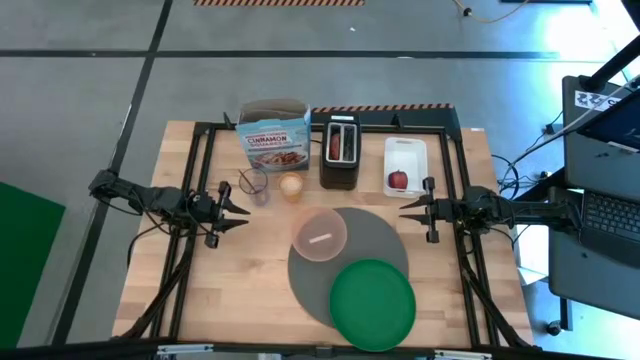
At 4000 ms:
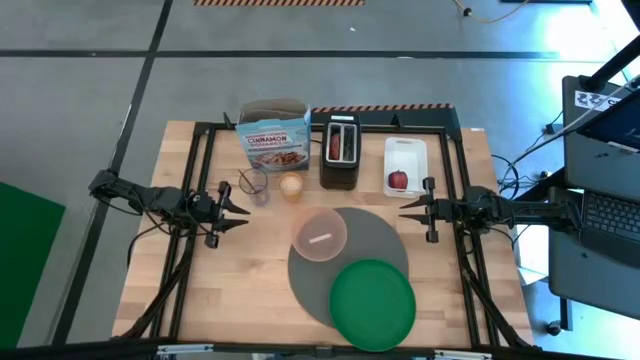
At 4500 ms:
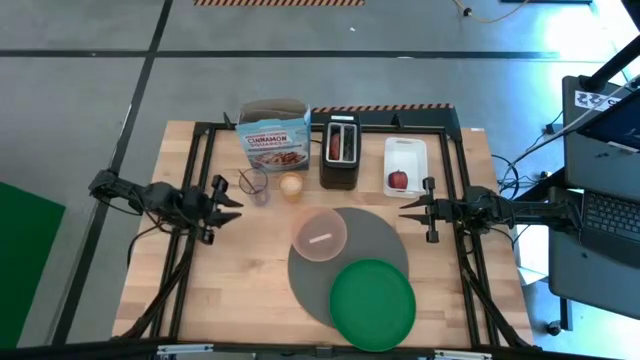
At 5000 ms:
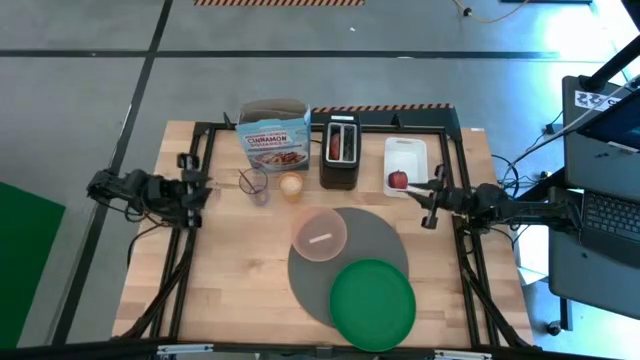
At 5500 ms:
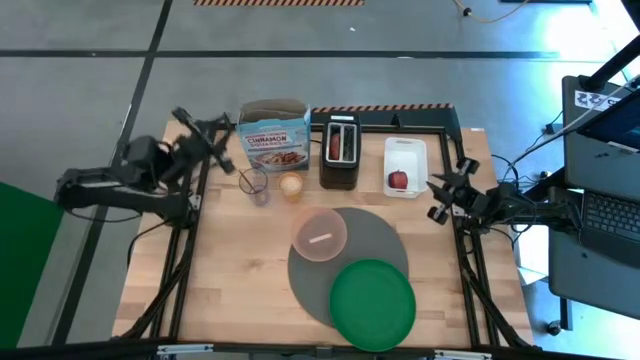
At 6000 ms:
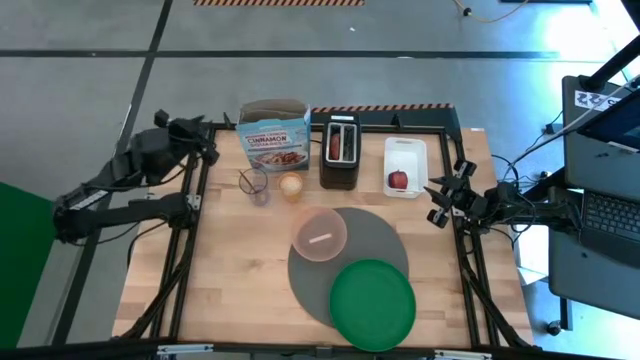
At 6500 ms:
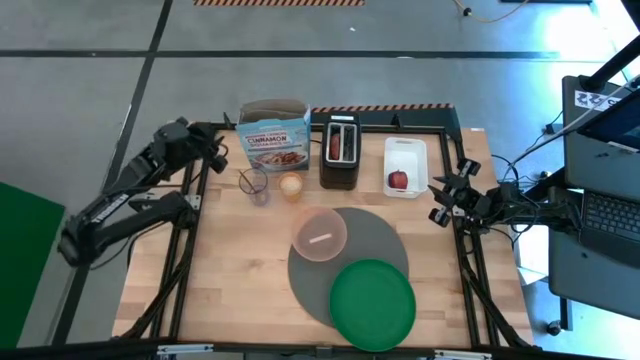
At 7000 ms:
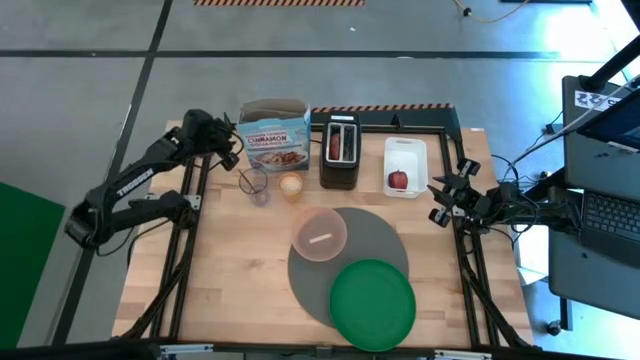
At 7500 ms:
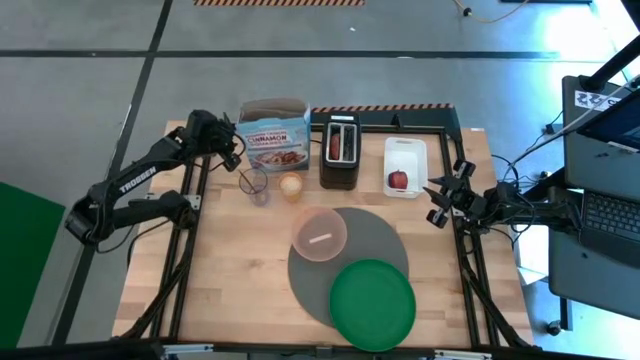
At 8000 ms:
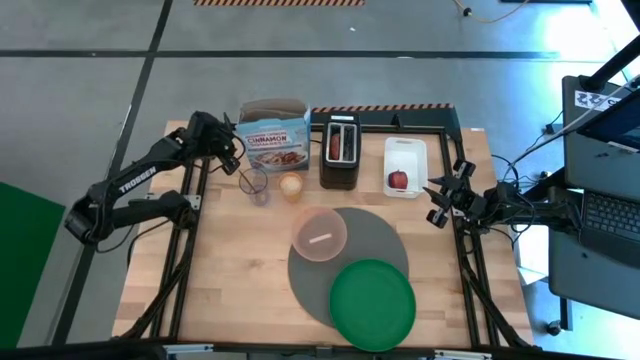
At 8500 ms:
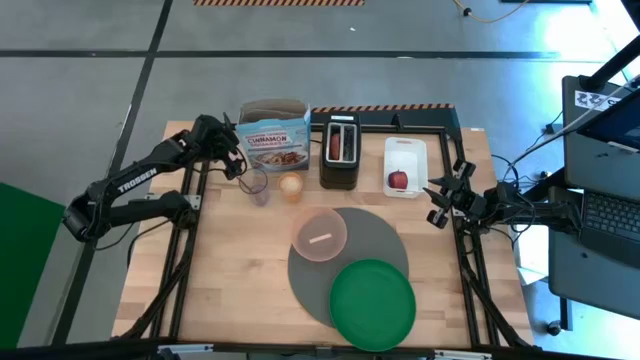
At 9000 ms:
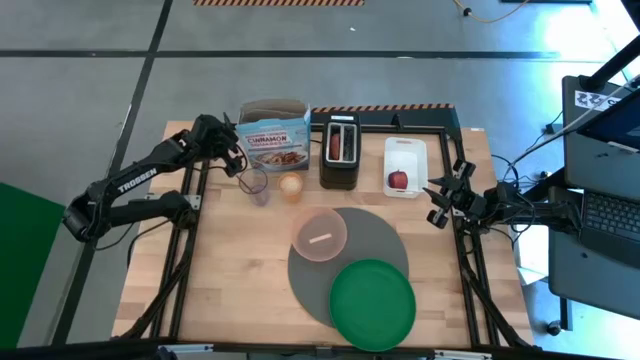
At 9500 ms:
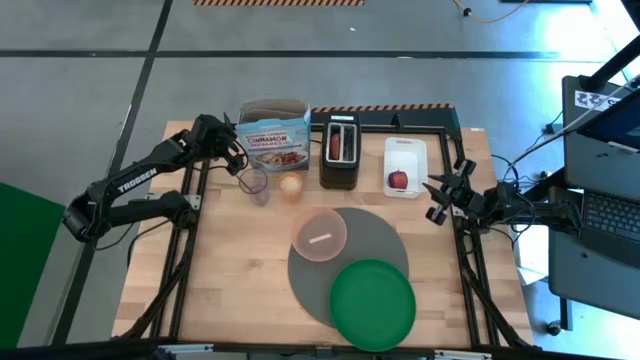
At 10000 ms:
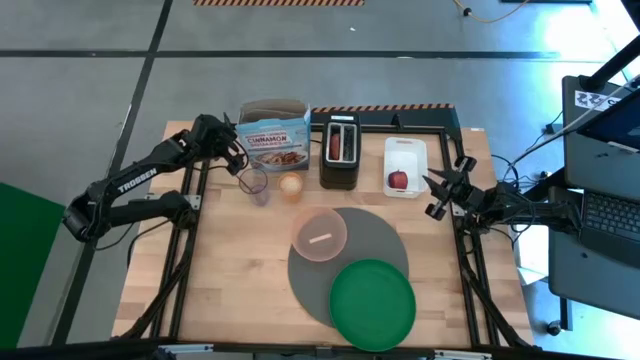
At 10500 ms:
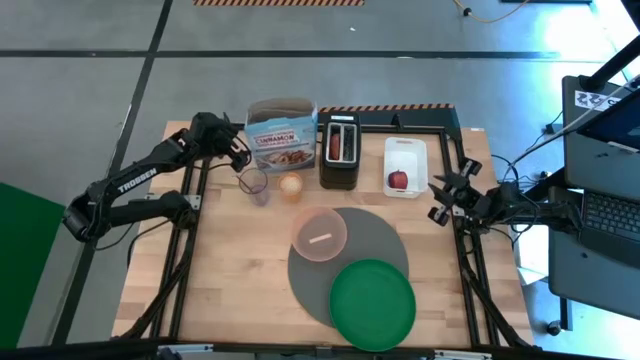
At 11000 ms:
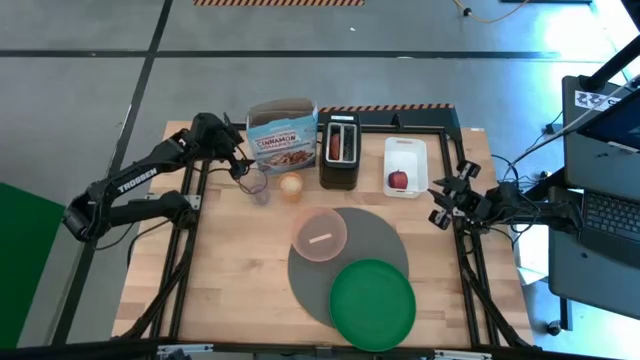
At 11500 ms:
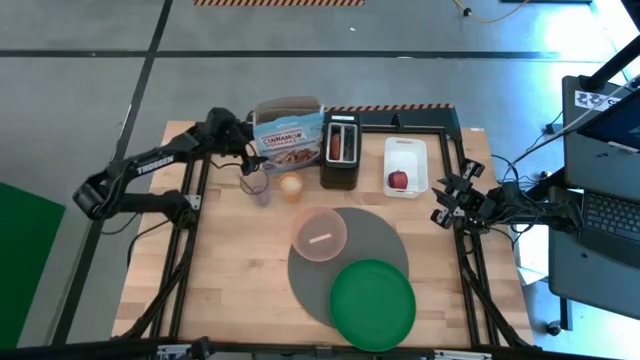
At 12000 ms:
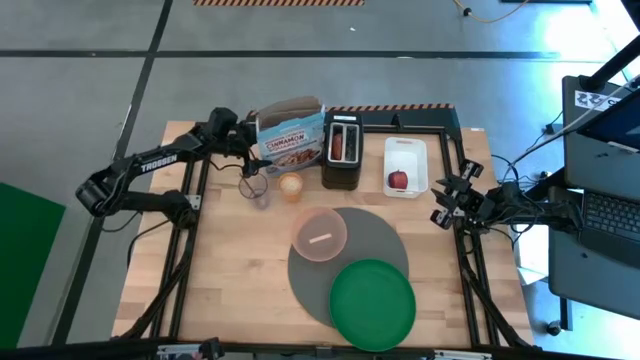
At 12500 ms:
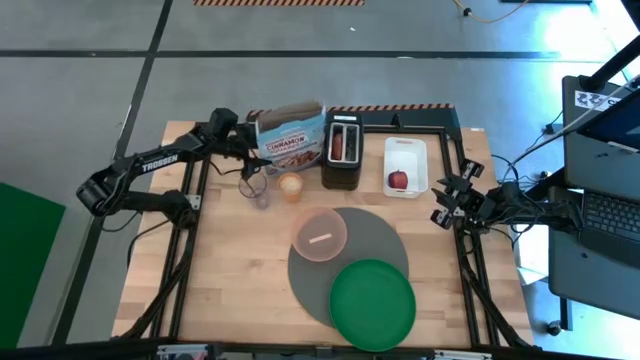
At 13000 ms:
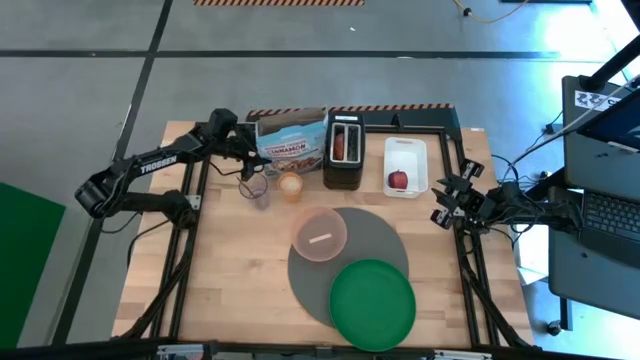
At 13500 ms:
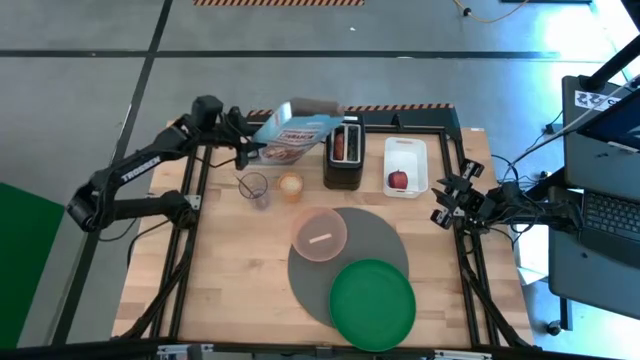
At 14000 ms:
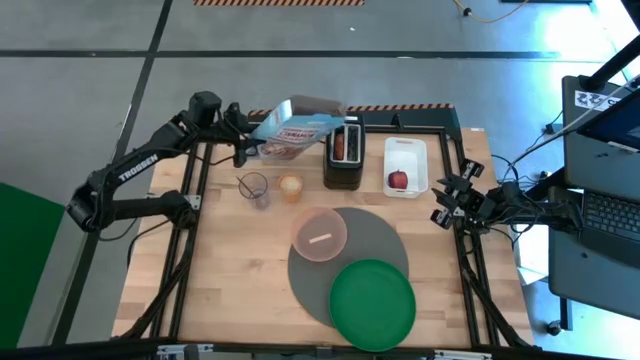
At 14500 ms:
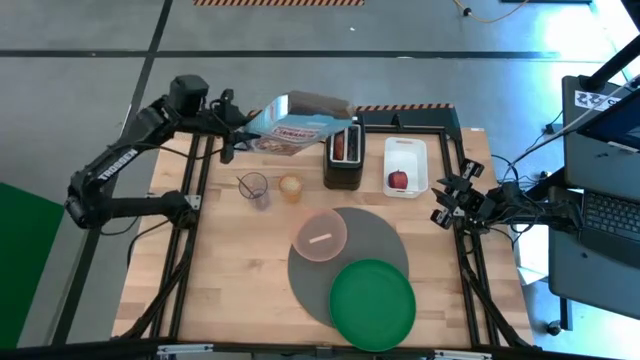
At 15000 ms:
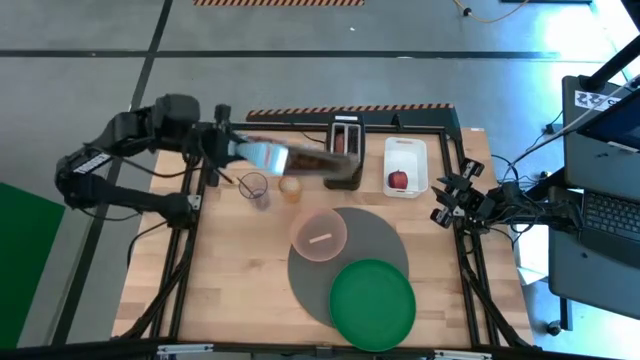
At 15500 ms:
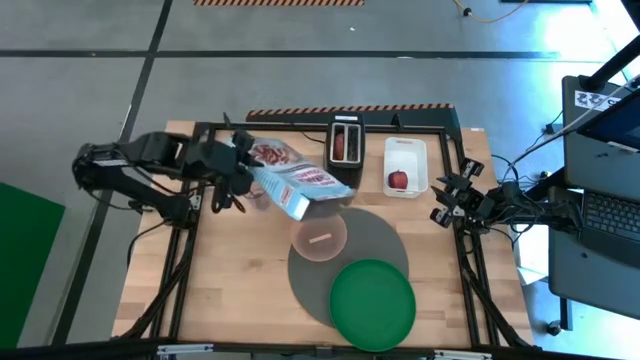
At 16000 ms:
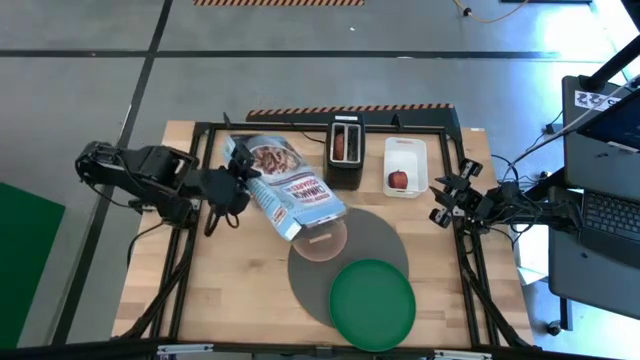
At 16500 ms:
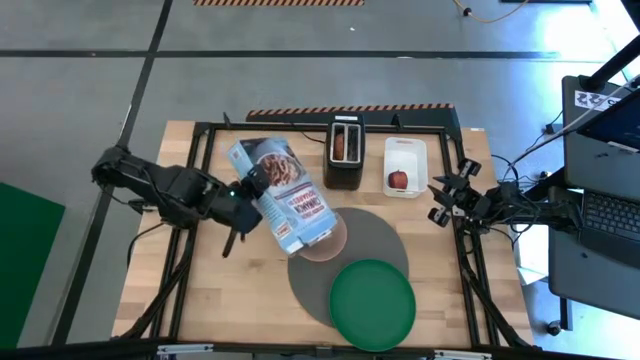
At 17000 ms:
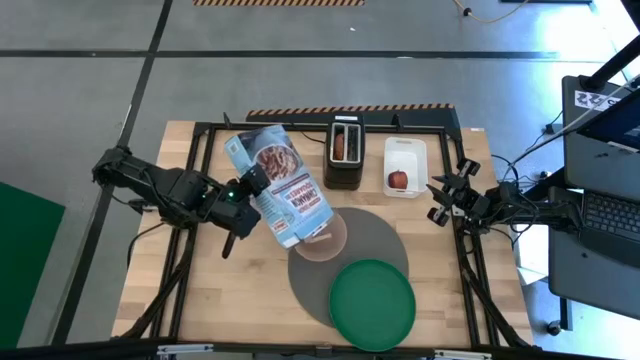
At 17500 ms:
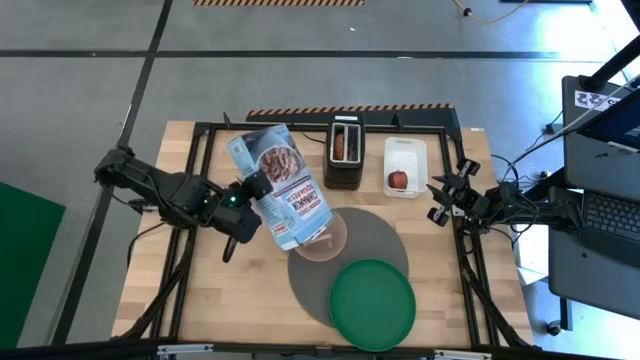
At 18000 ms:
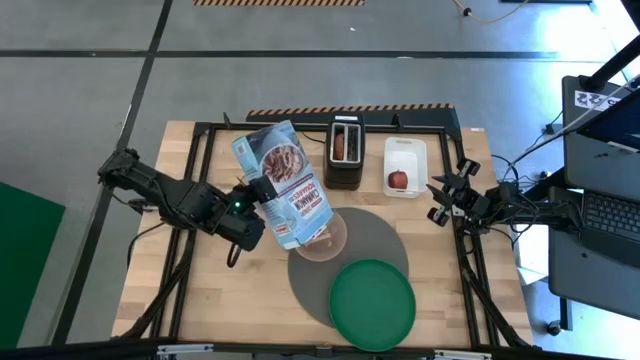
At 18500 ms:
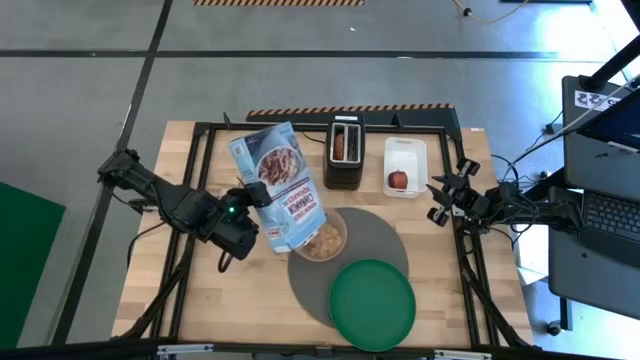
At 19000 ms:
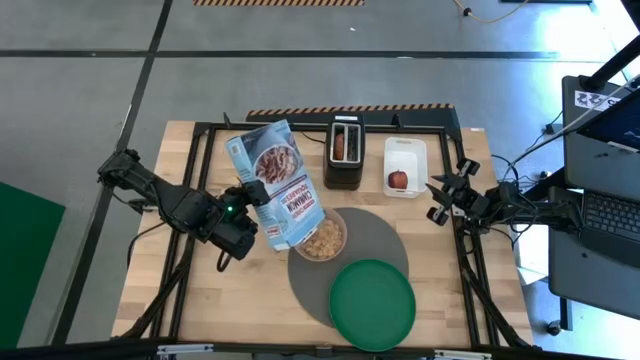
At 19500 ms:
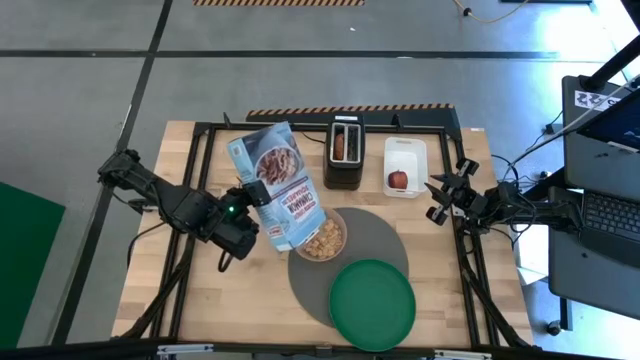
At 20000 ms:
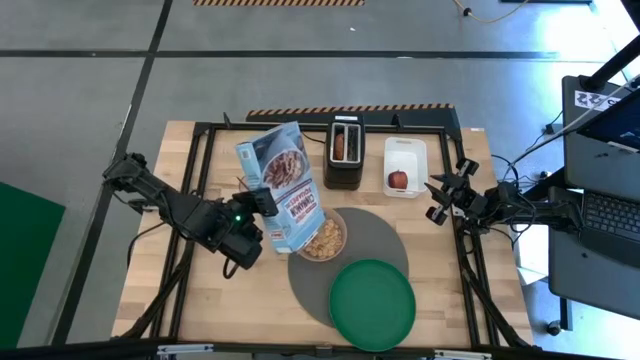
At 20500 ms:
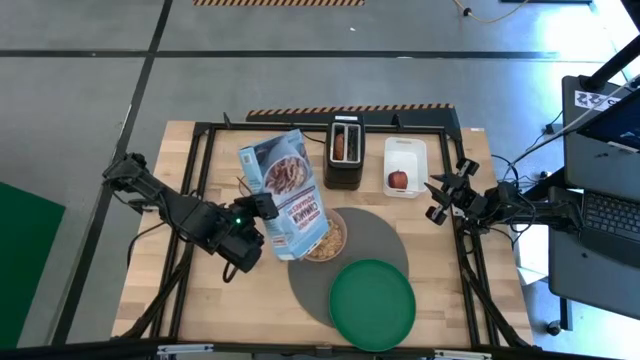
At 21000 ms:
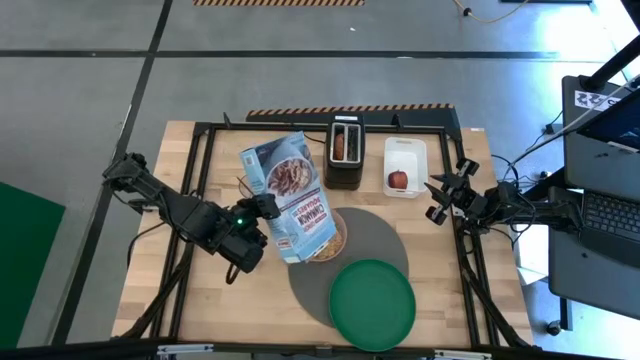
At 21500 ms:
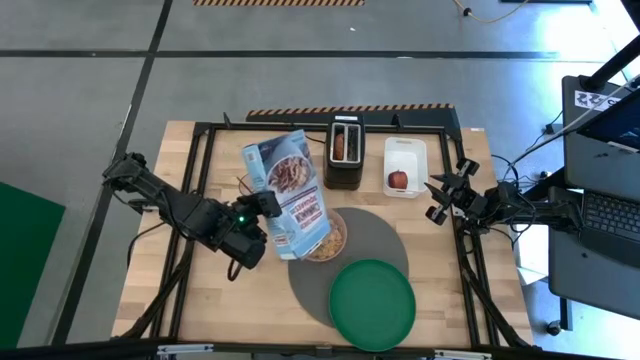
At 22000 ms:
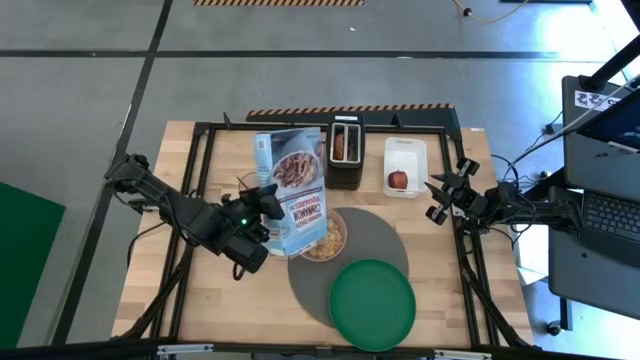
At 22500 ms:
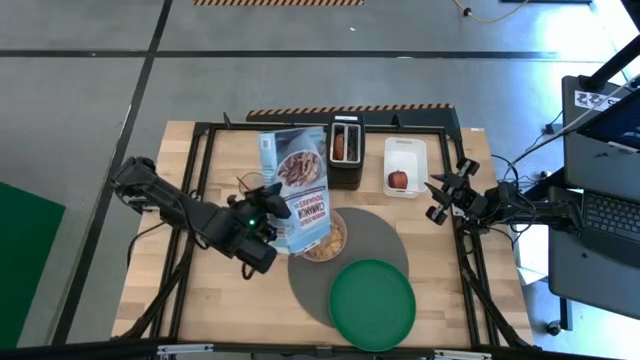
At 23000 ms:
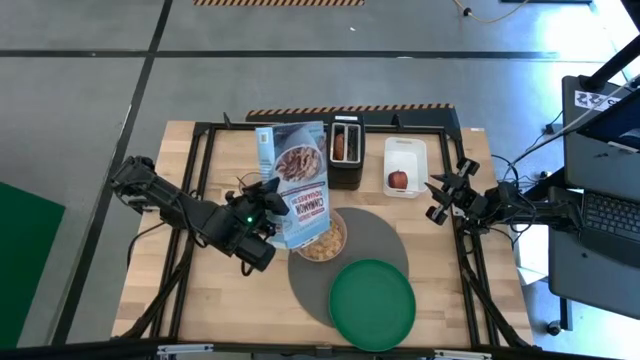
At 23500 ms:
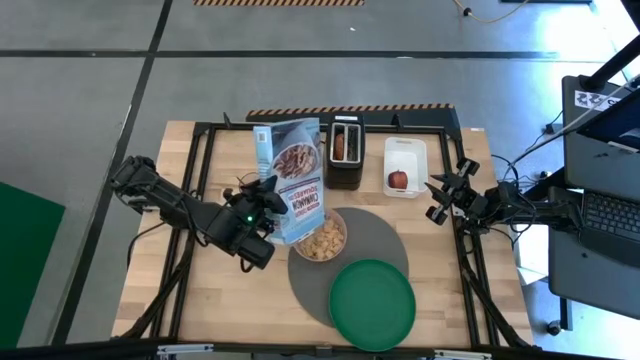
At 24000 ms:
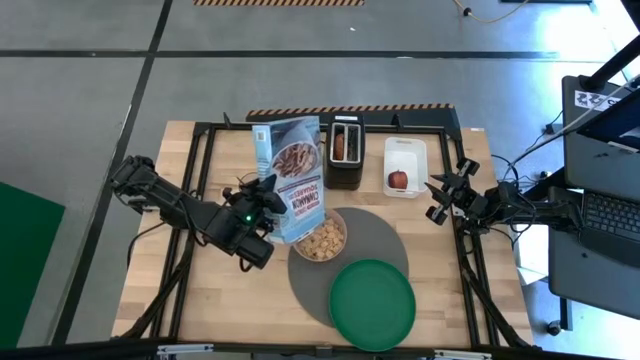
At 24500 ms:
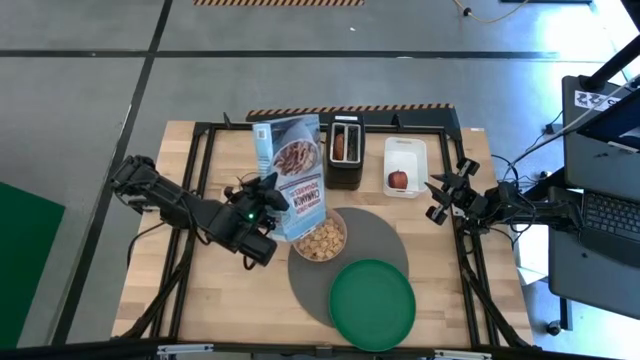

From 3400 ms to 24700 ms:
Task: Arrange a breakfast setting
Pour the cereal from the cereal box into the pink bowl
